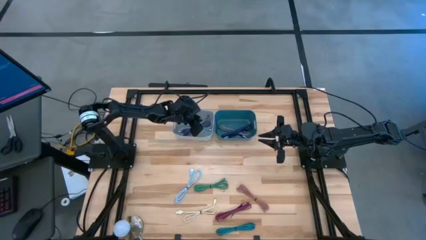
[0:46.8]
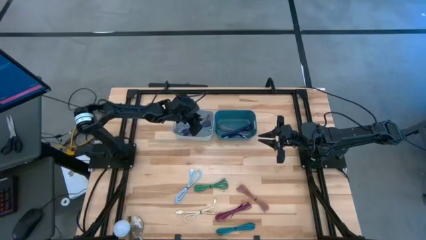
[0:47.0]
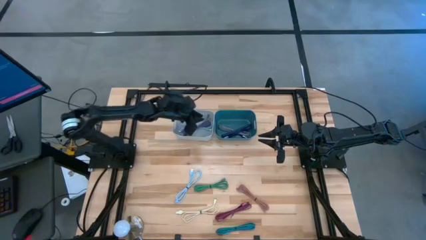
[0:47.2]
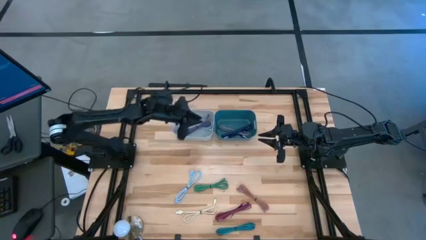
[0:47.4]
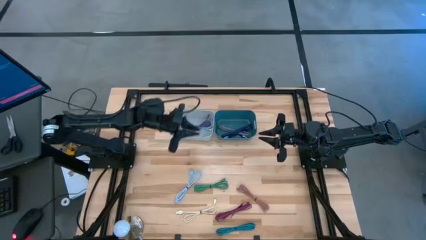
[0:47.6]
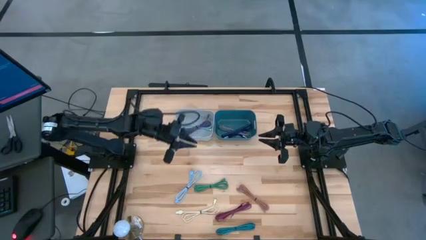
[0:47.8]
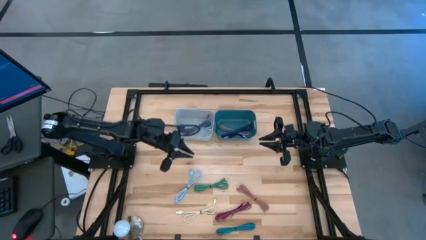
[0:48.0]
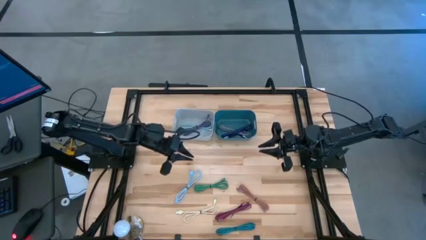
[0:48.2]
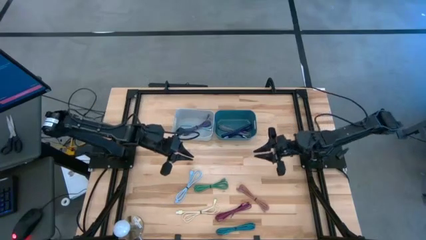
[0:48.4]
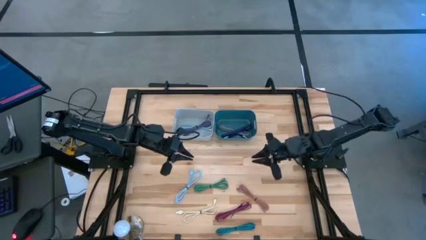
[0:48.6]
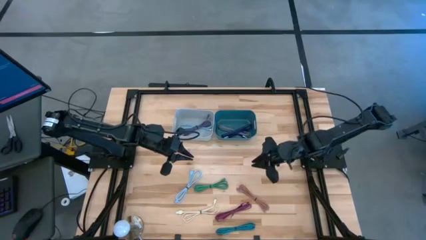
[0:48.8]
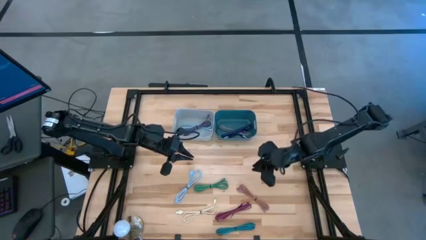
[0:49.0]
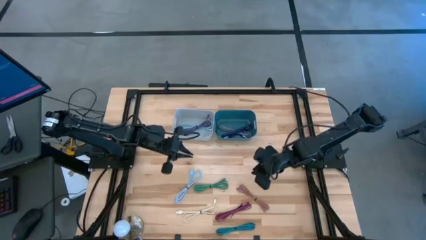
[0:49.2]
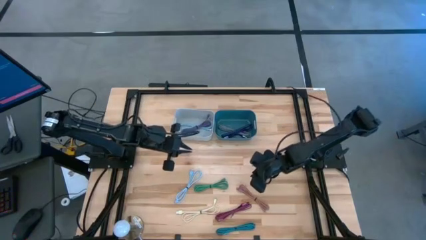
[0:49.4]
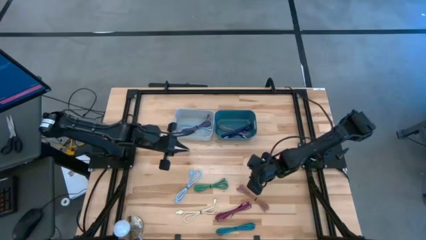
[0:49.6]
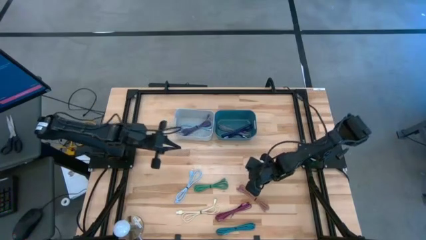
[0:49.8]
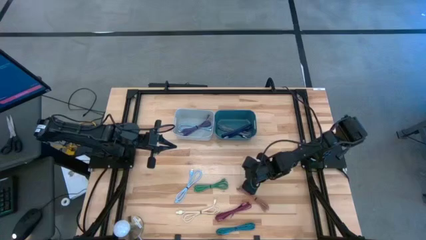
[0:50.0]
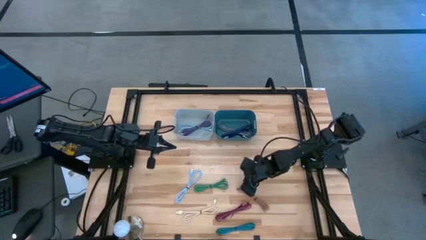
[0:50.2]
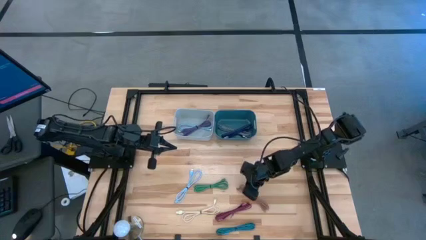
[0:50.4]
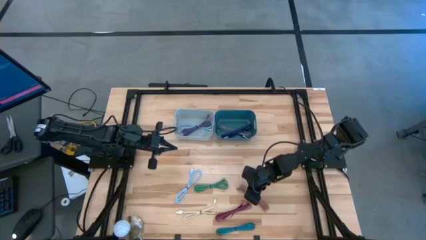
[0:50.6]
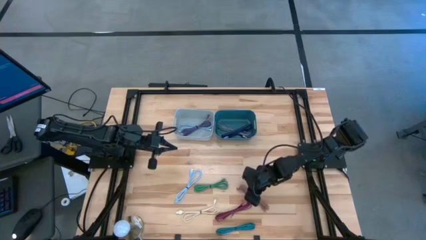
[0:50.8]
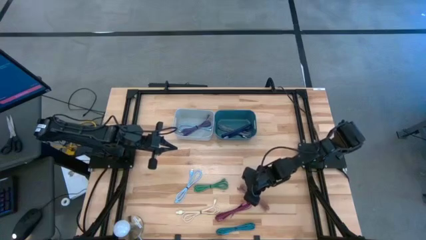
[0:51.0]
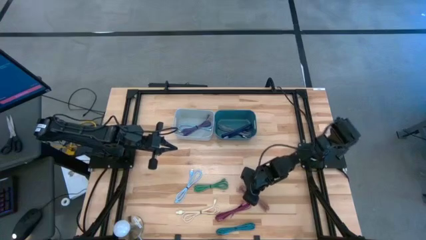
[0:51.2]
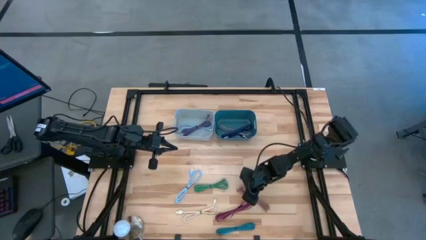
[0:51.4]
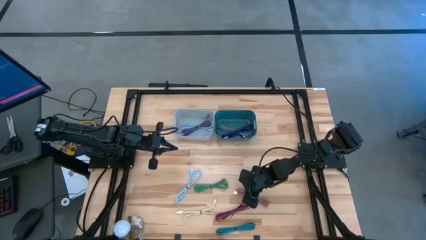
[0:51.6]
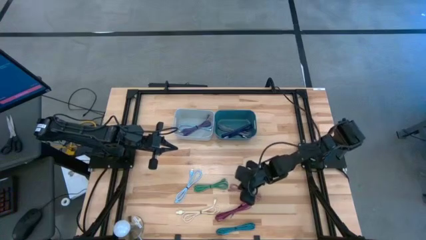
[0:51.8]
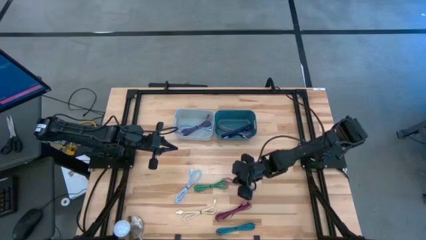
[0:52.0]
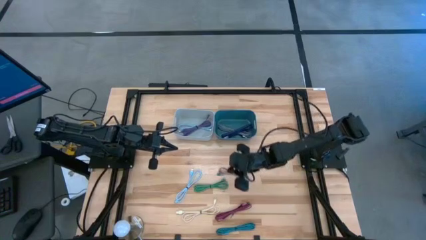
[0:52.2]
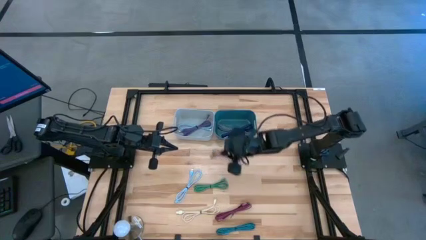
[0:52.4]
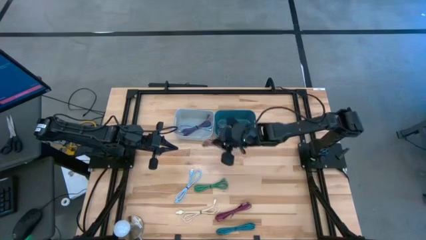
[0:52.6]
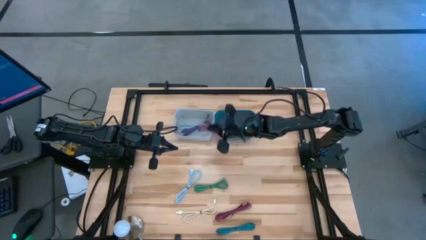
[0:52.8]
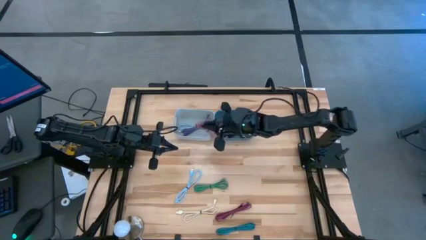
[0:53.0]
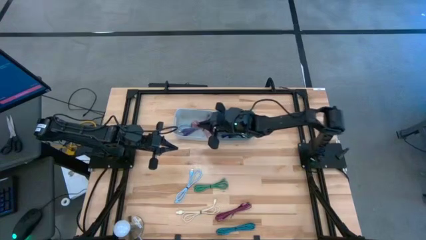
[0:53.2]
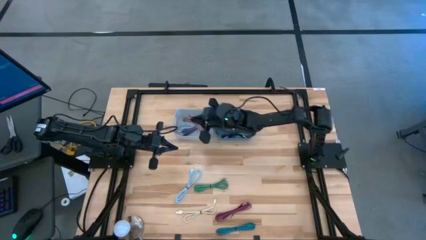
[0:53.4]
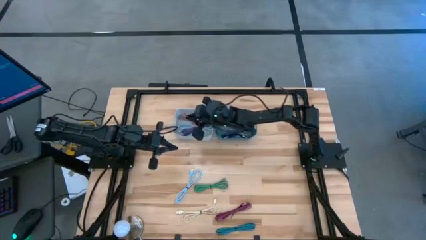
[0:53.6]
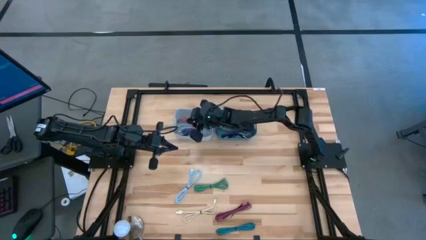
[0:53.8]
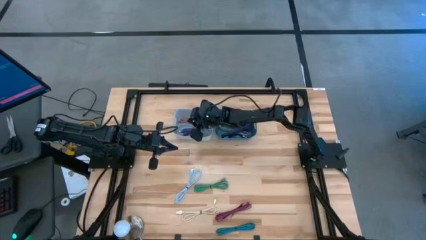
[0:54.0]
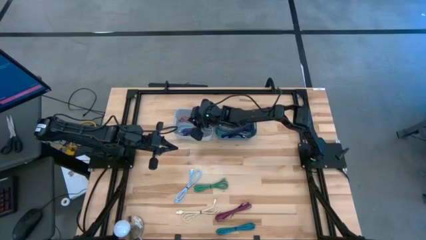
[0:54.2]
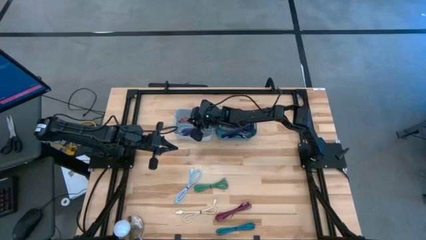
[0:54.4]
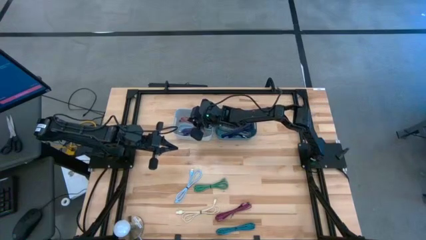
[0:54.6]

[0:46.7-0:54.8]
Task: Pick & Place USB Port
Put the pink charger cable into the white bin

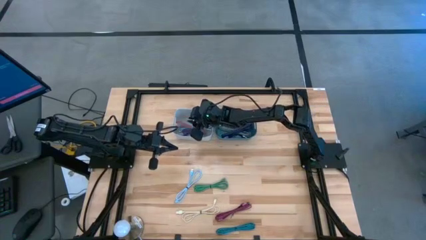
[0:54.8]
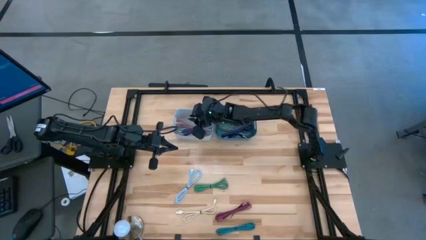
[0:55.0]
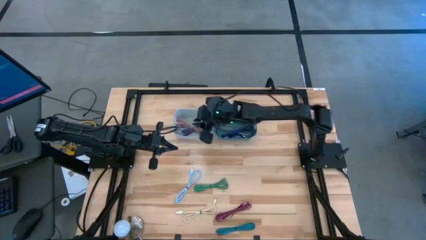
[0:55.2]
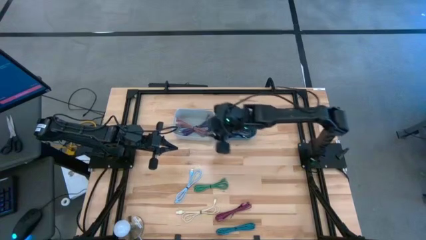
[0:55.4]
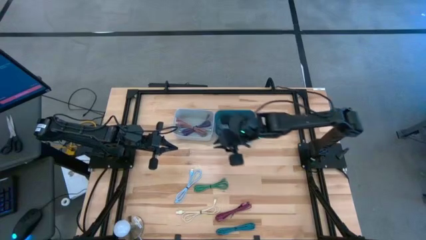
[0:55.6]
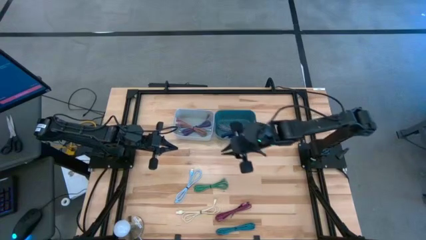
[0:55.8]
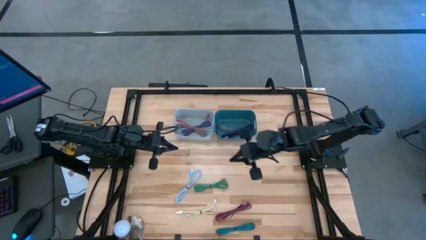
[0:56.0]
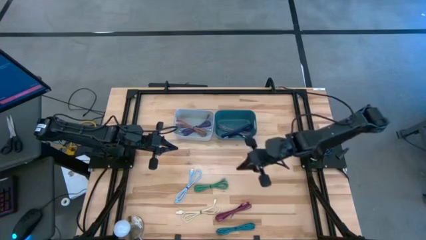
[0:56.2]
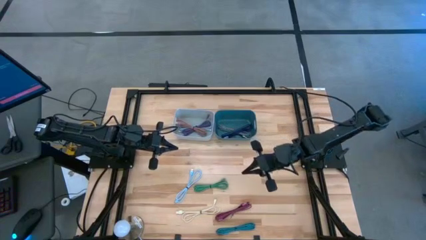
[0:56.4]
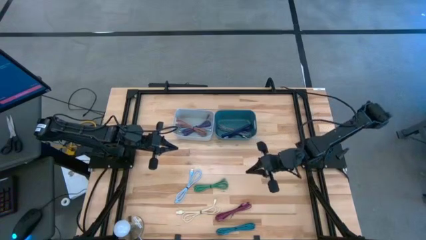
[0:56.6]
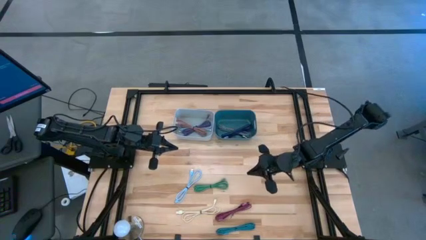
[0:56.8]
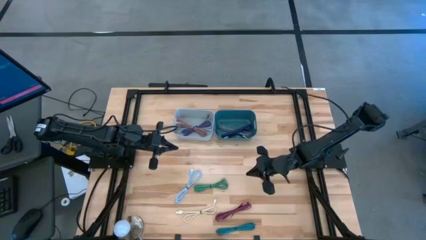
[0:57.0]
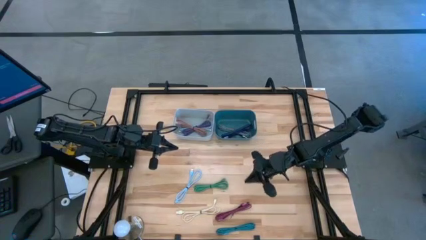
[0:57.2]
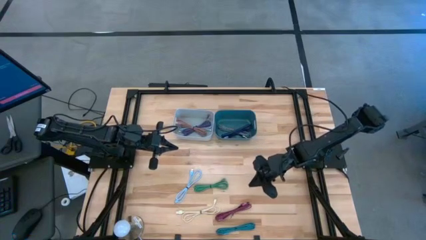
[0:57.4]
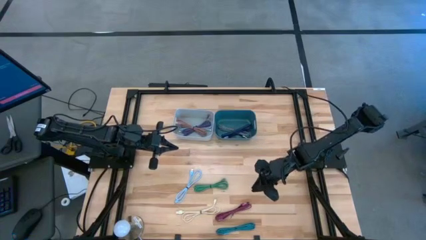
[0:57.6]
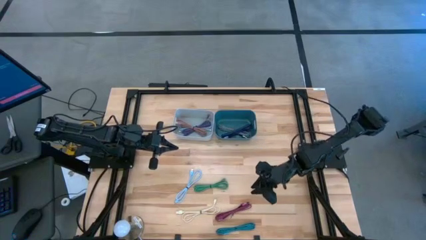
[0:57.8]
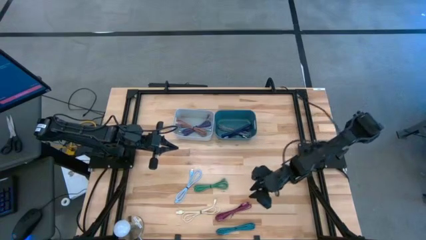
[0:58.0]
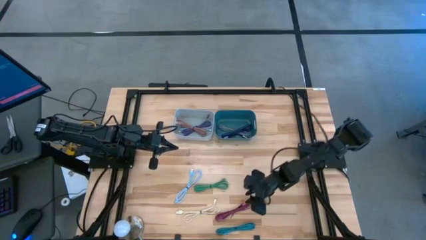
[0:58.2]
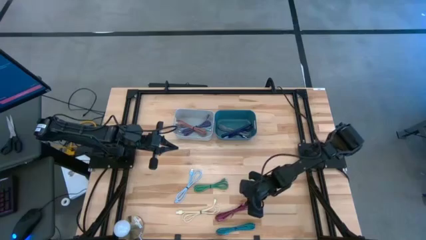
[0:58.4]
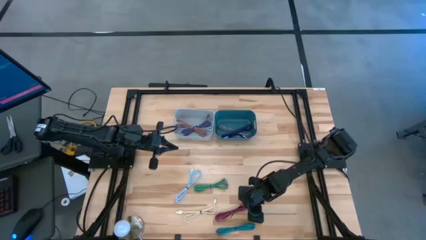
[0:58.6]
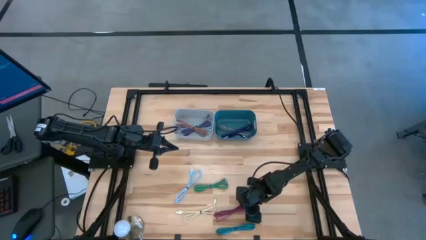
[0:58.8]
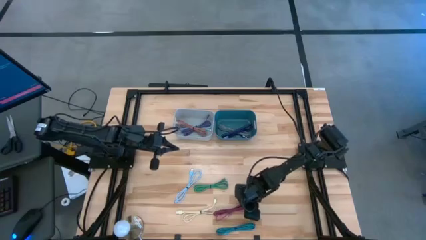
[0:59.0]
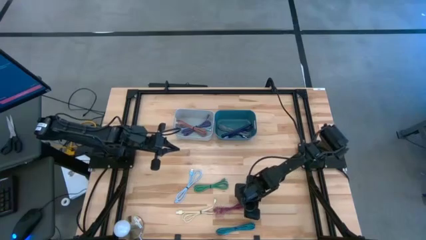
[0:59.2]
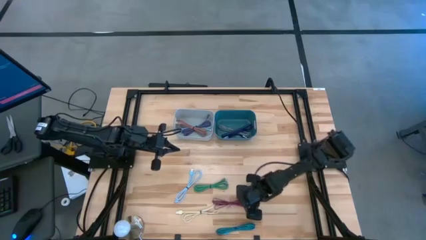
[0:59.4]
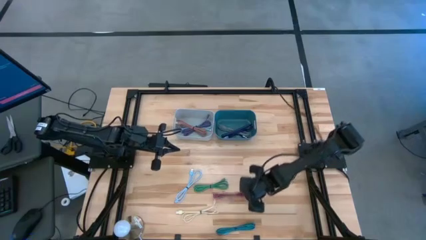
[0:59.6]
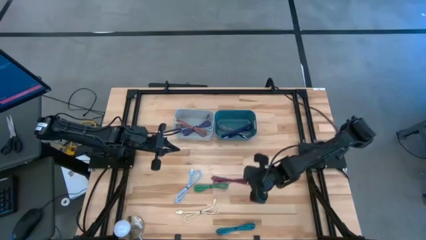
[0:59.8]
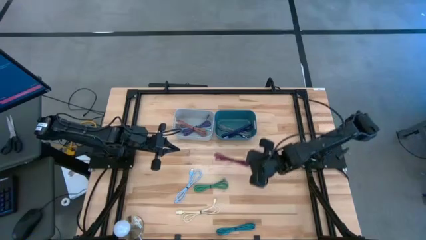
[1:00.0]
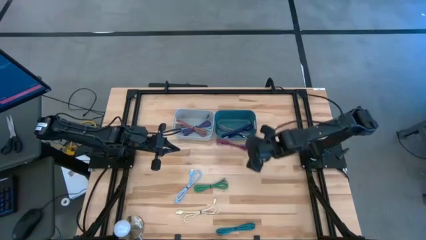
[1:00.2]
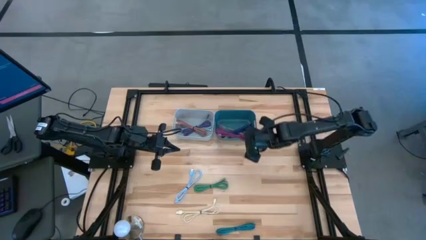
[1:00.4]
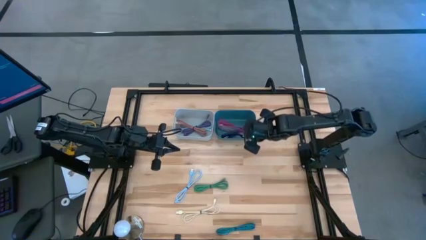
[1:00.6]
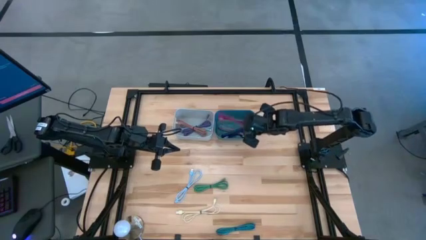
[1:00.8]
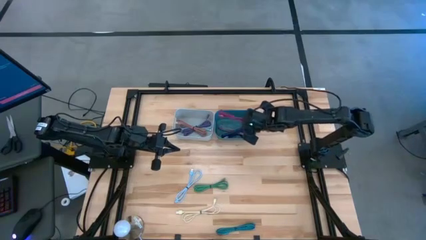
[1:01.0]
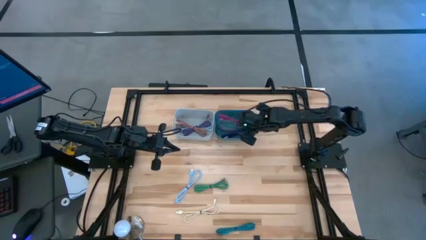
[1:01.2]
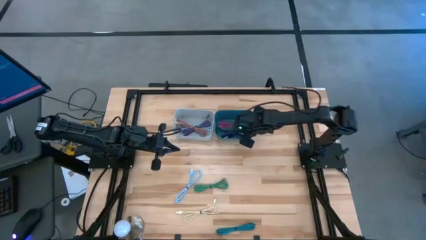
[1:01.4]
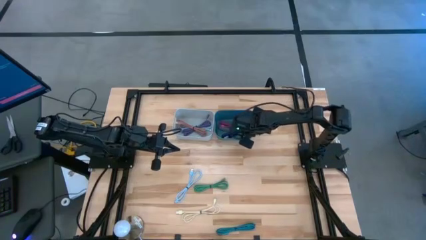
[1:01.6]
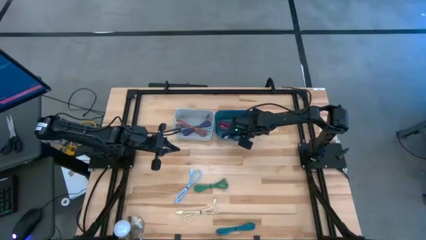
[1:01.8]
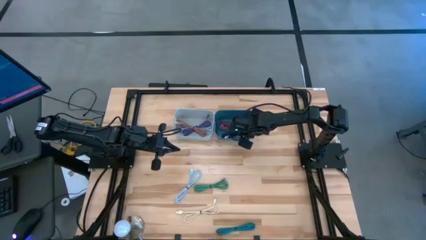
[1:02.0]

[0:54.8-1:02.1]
Put the pink patterned charger cable into the green bin
